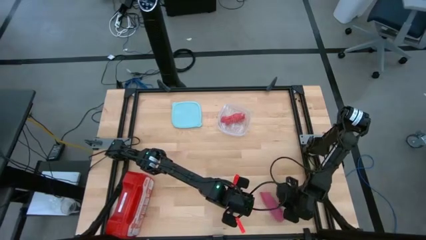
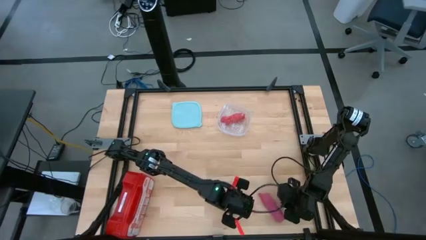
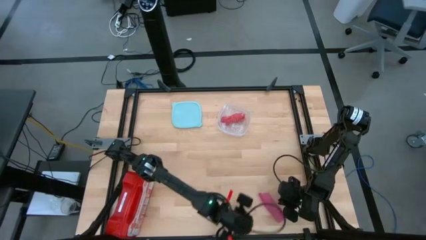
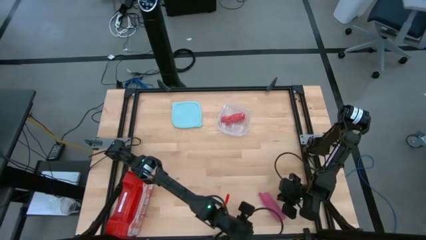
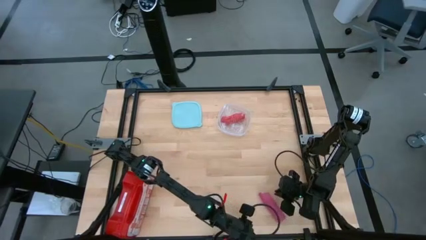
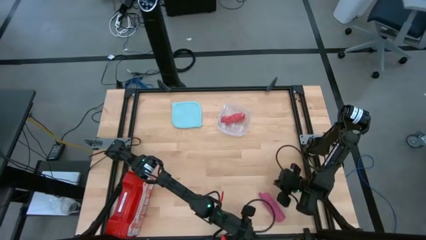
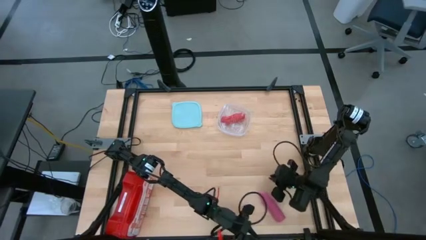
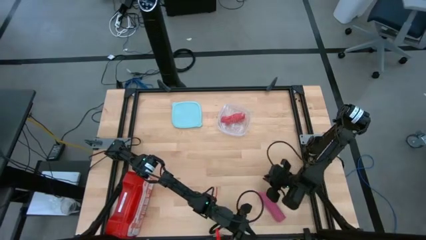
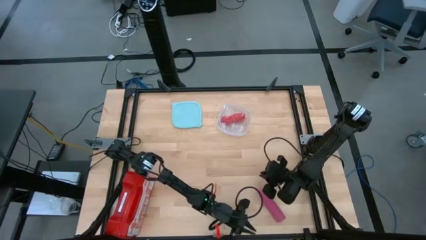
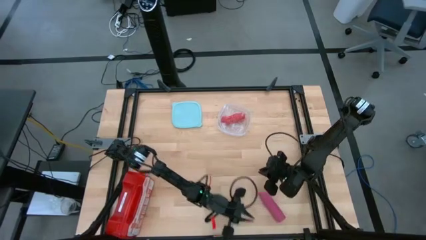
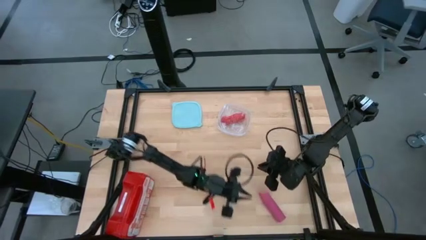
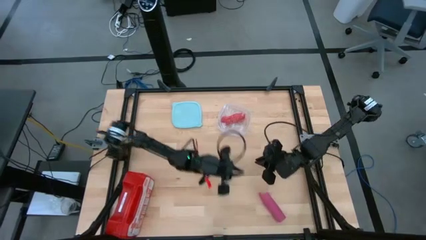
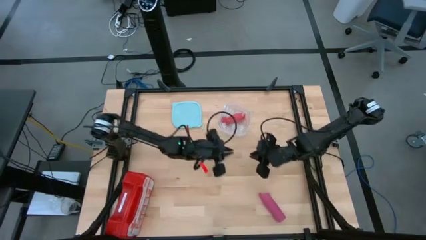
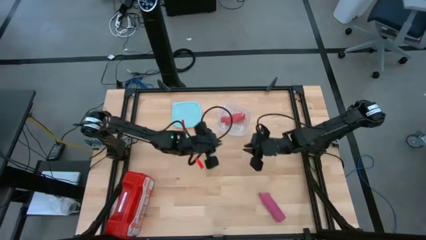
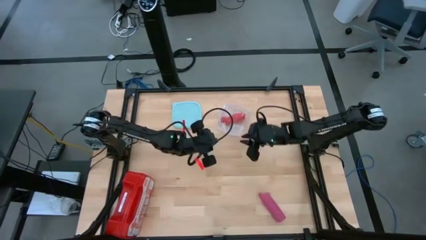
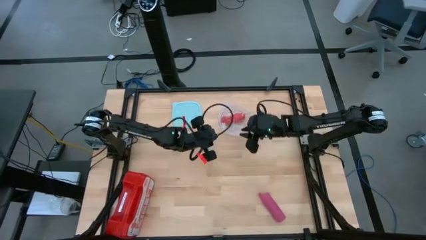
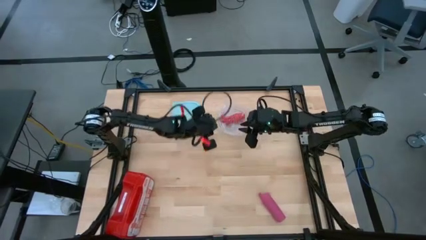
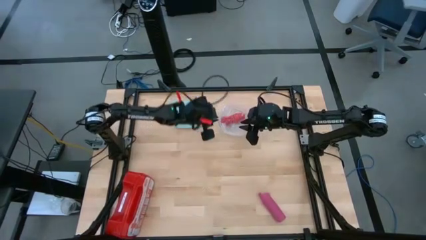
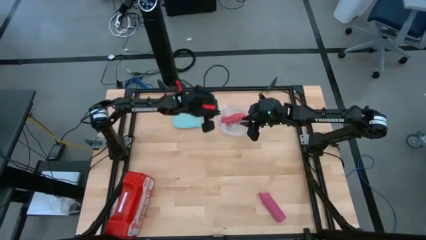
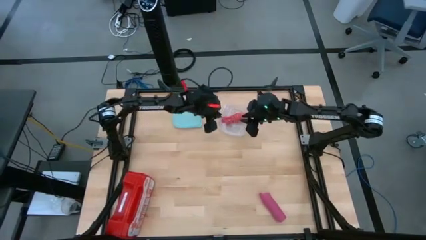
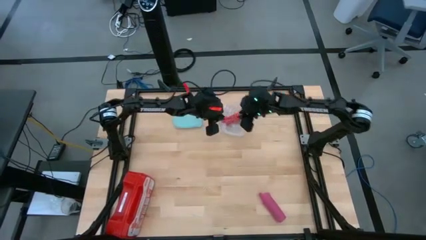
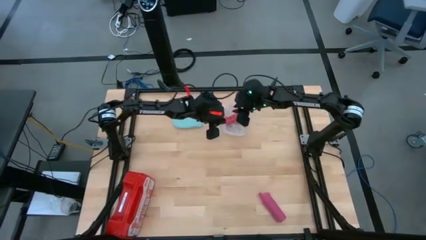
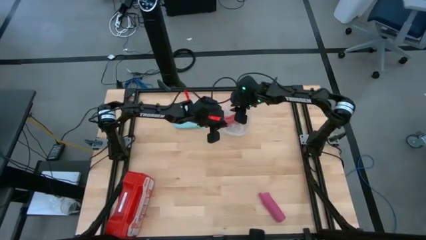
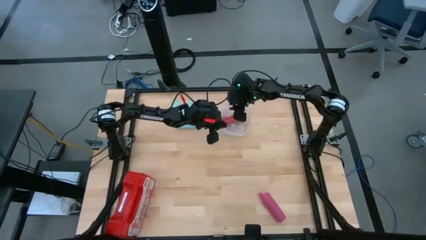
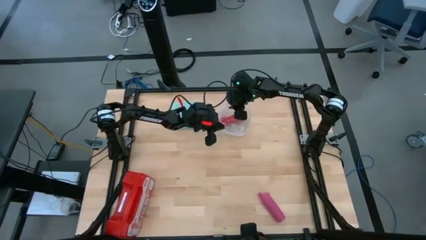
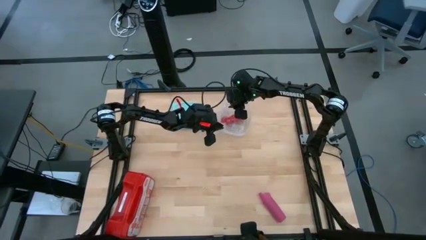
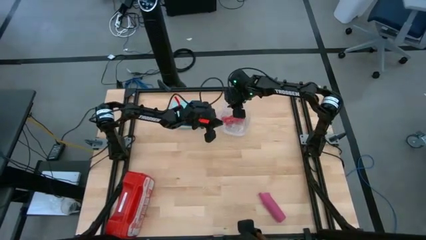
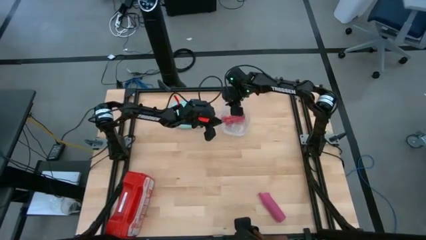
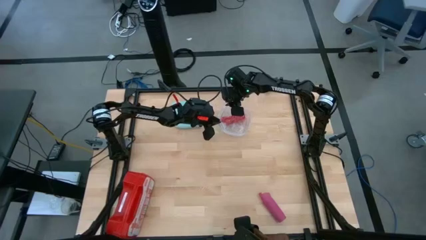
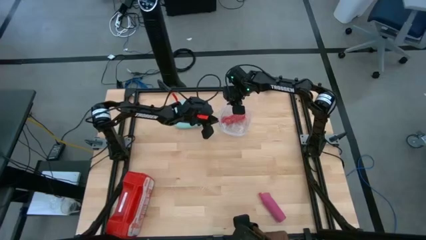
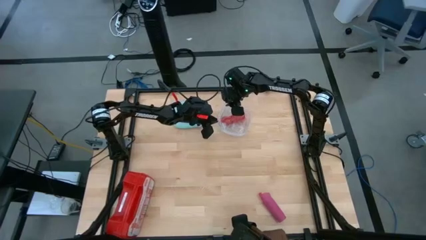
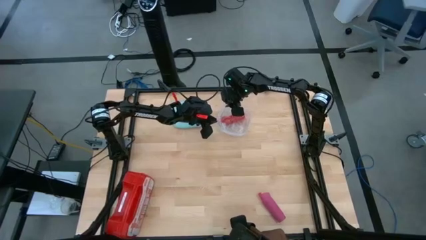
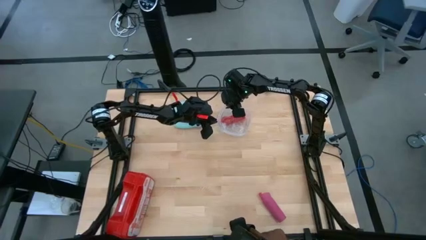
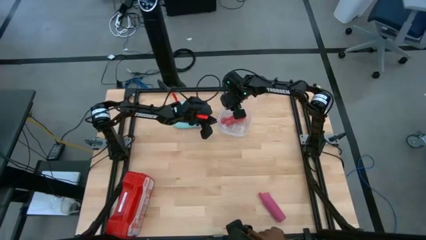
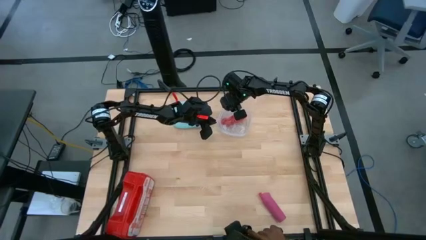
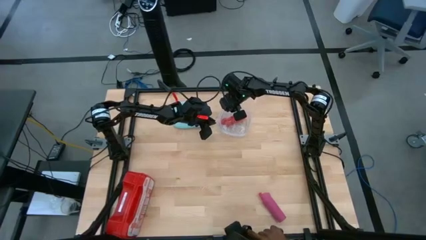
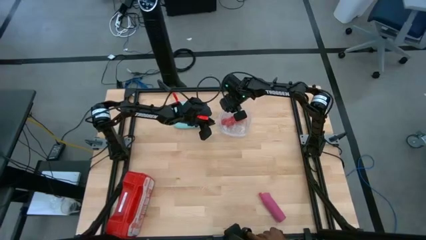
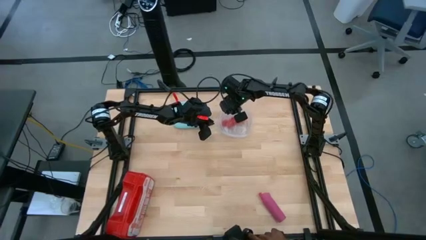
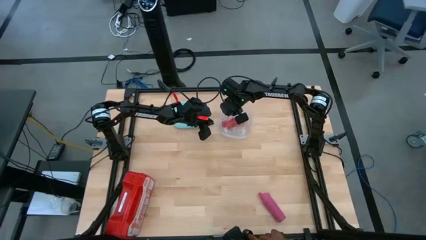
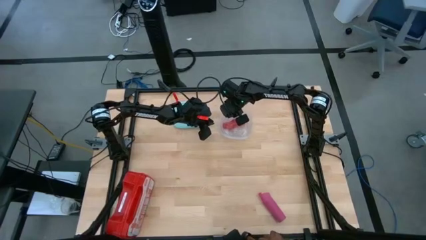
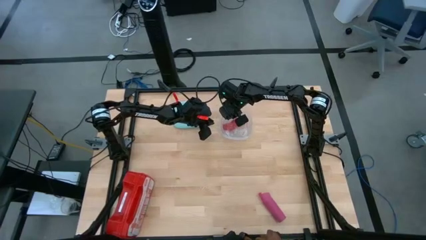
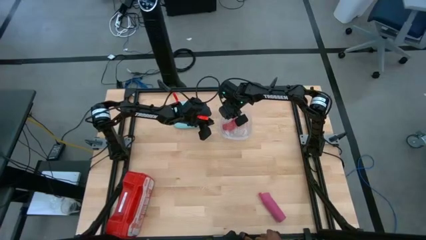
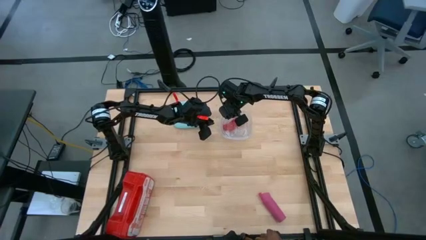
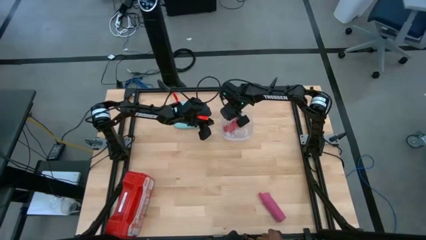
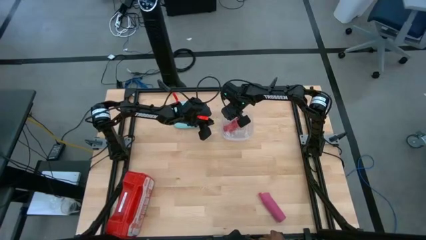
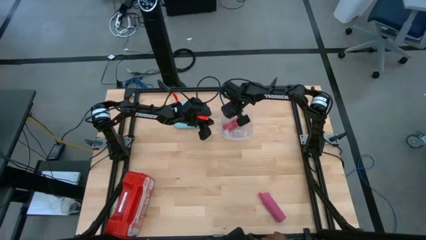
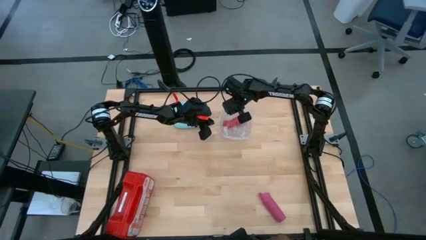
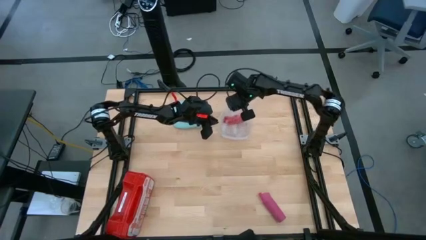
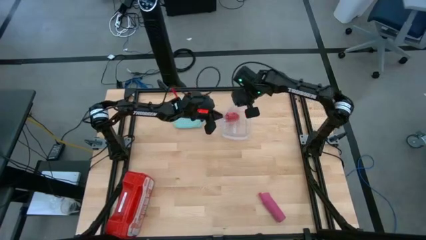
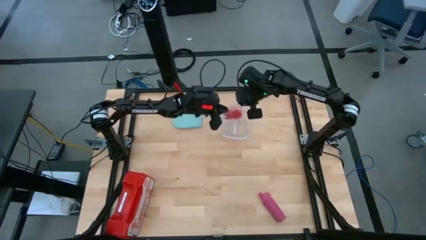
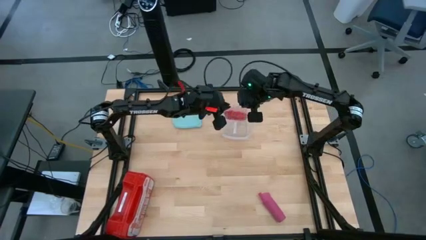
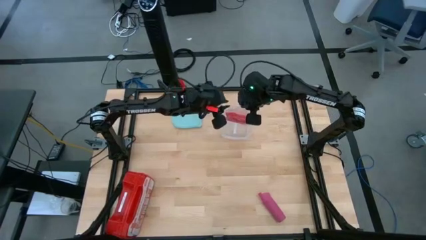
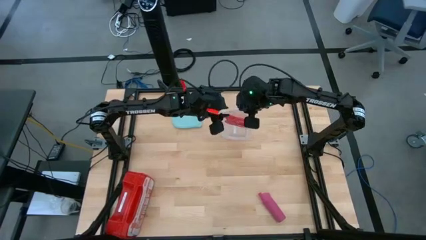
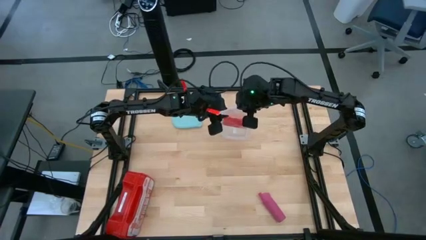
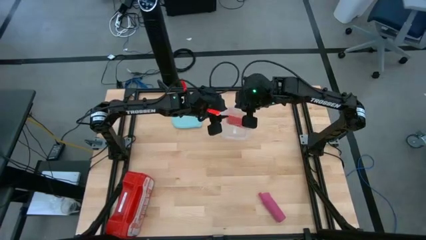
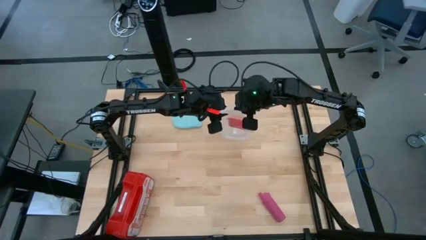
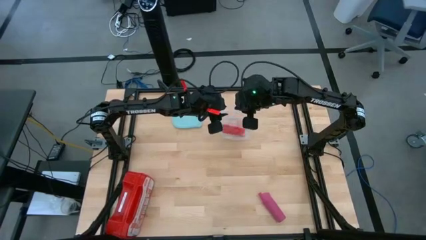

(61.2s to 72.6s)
Task: Roll bandage
Open the transparent zip bag
